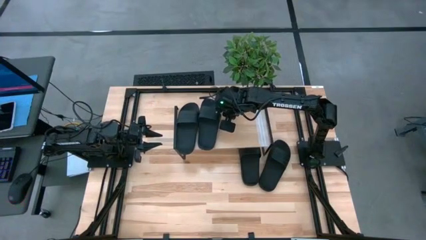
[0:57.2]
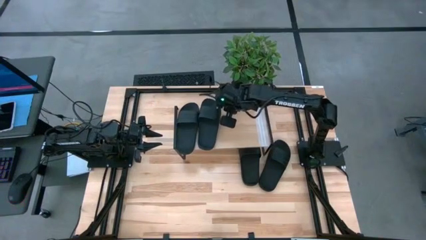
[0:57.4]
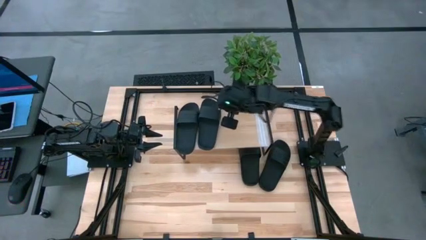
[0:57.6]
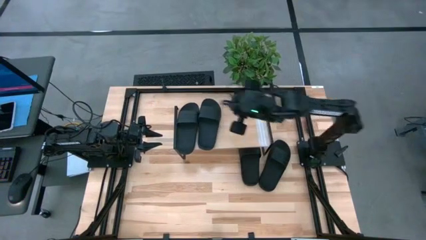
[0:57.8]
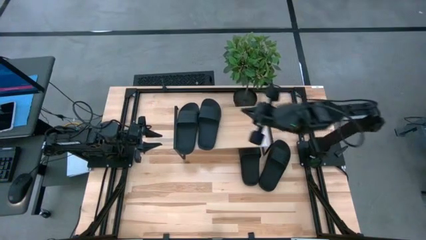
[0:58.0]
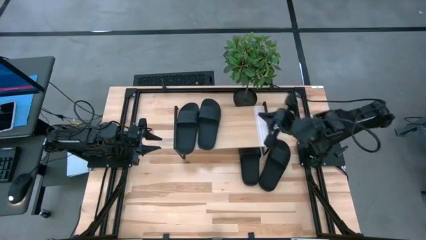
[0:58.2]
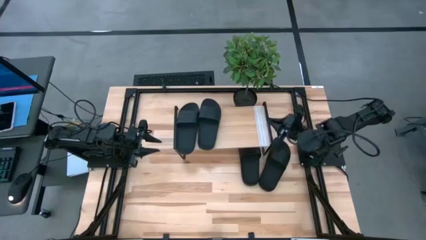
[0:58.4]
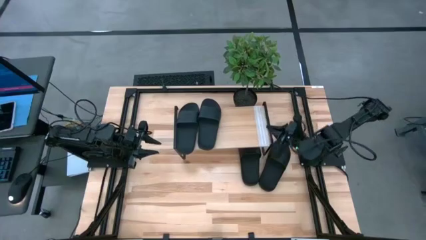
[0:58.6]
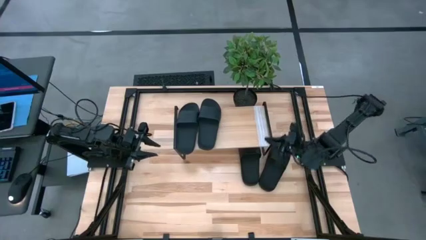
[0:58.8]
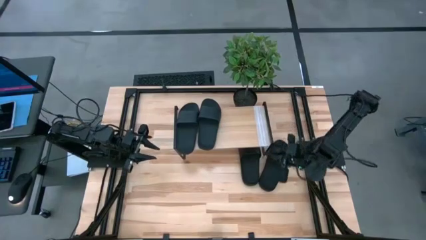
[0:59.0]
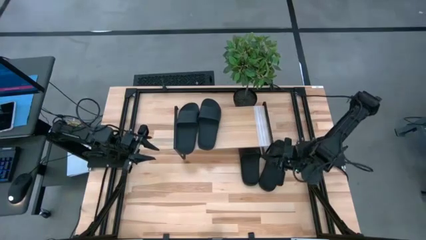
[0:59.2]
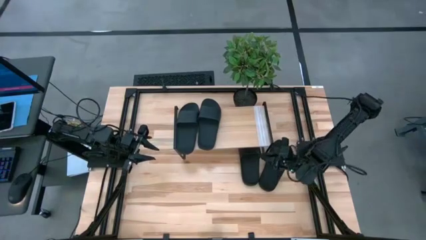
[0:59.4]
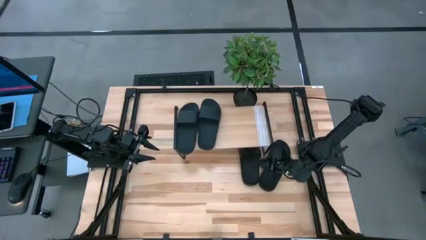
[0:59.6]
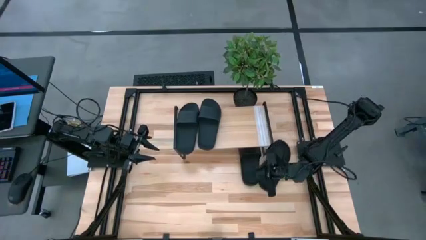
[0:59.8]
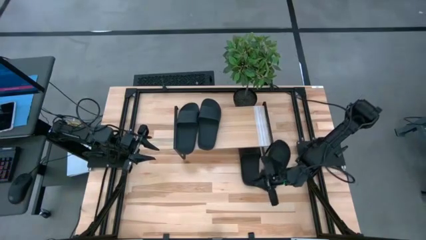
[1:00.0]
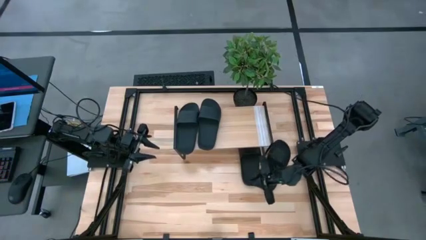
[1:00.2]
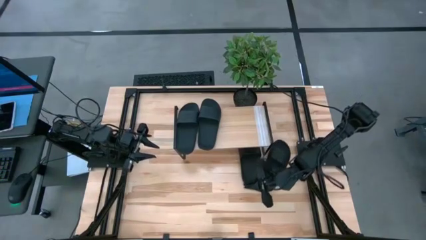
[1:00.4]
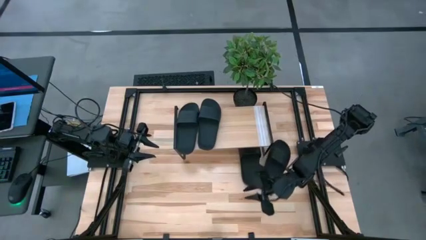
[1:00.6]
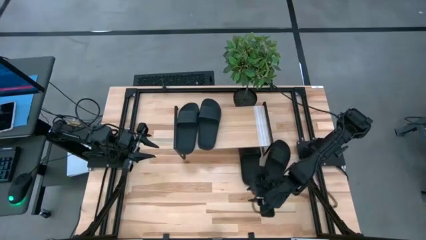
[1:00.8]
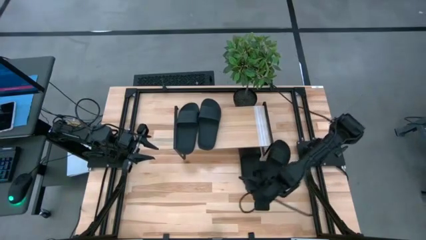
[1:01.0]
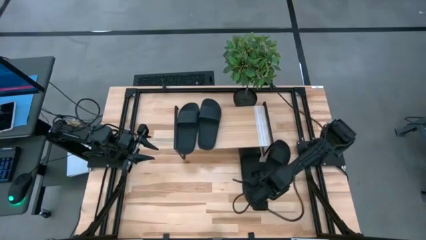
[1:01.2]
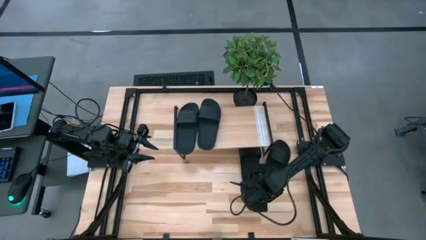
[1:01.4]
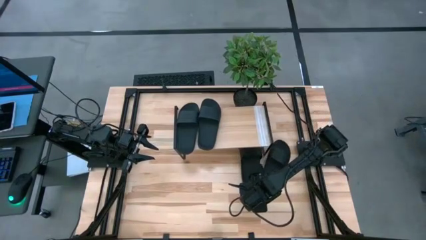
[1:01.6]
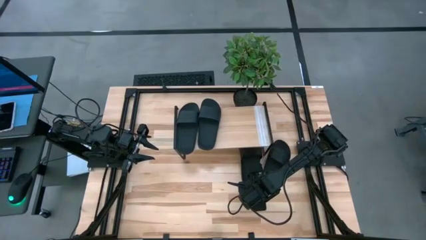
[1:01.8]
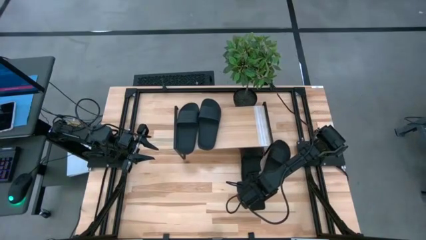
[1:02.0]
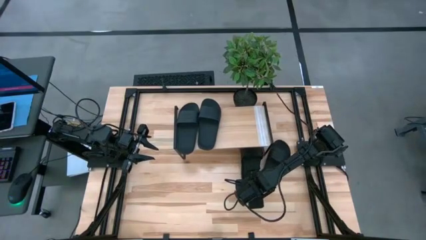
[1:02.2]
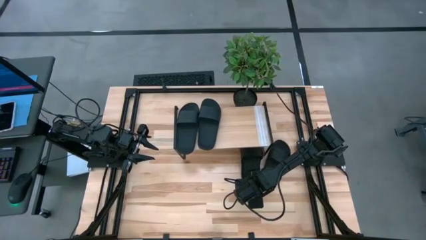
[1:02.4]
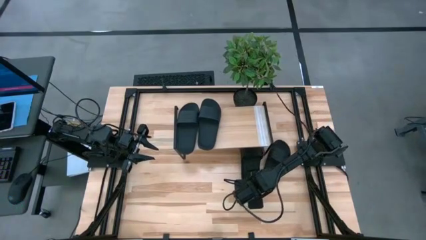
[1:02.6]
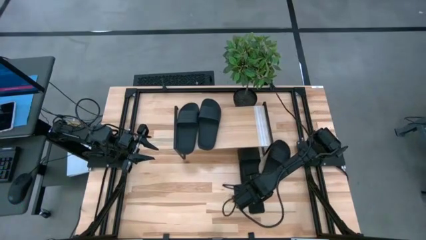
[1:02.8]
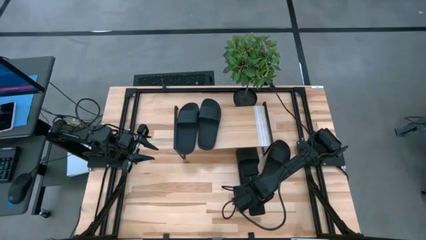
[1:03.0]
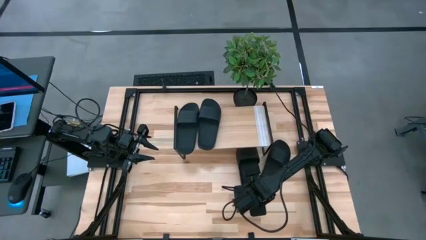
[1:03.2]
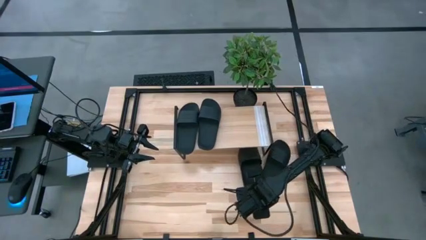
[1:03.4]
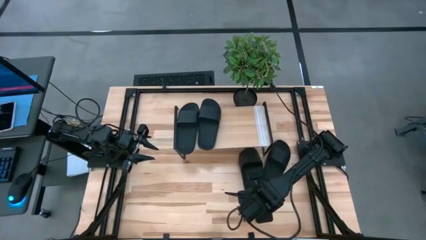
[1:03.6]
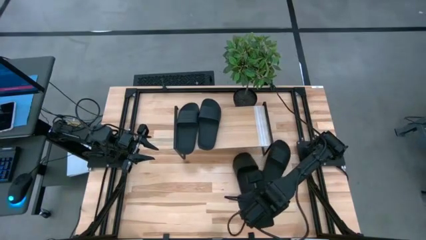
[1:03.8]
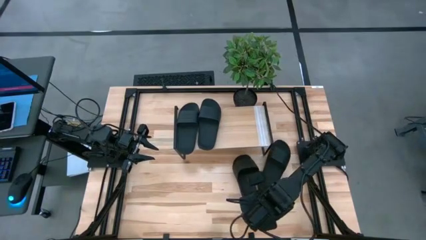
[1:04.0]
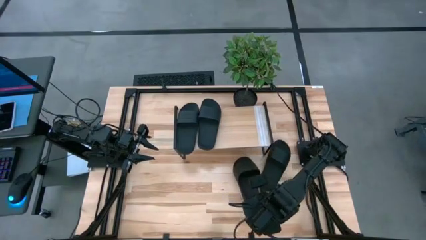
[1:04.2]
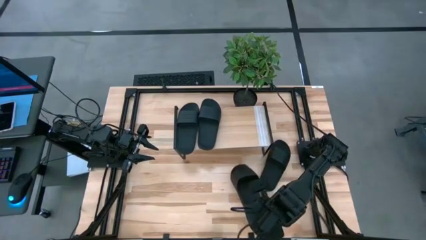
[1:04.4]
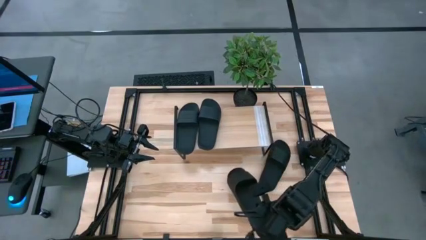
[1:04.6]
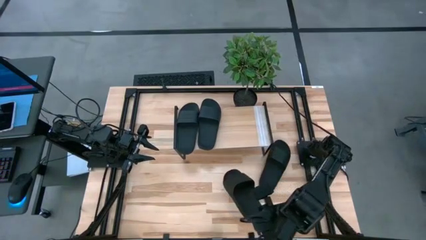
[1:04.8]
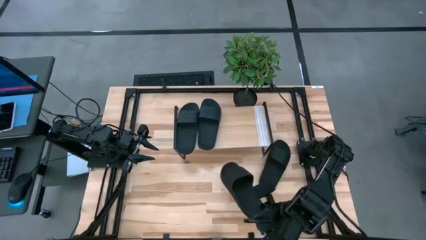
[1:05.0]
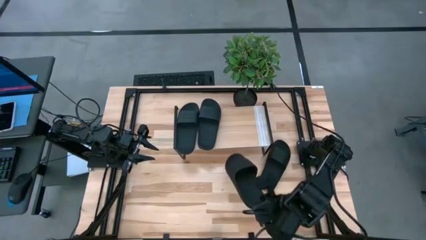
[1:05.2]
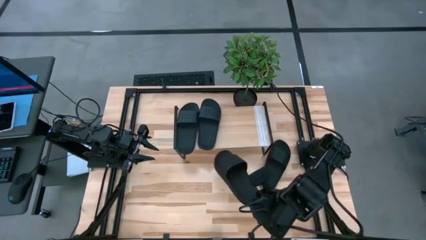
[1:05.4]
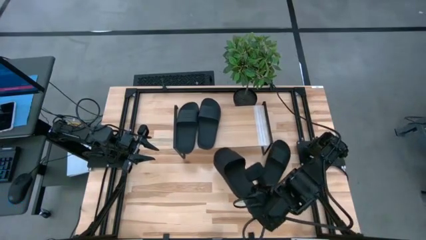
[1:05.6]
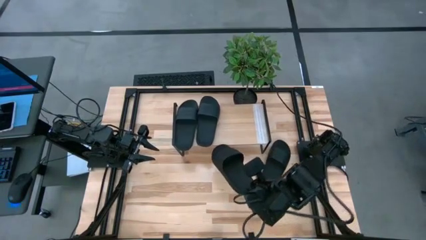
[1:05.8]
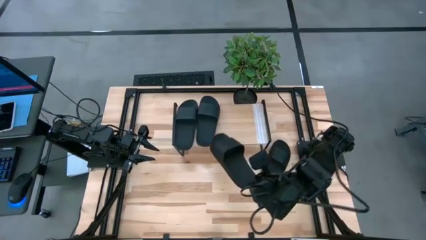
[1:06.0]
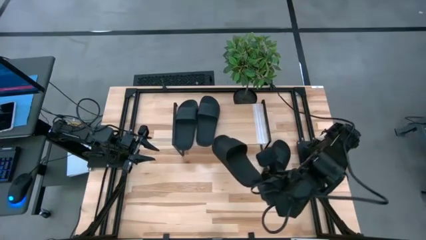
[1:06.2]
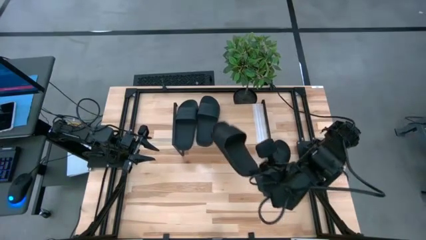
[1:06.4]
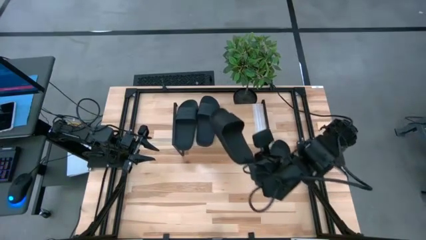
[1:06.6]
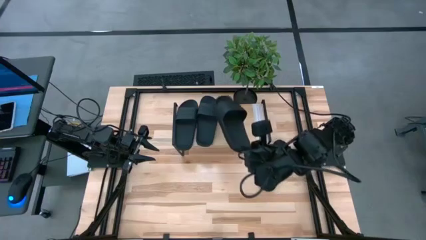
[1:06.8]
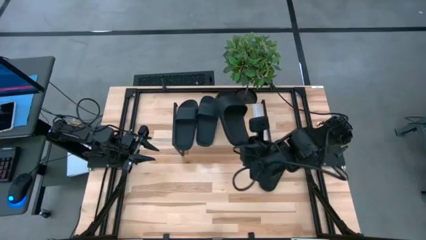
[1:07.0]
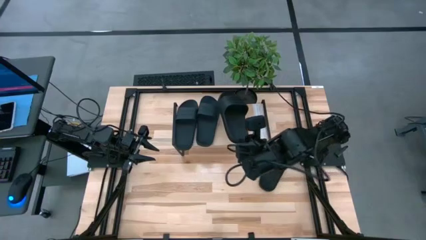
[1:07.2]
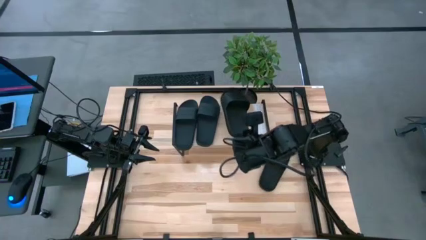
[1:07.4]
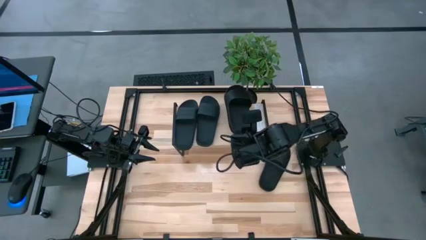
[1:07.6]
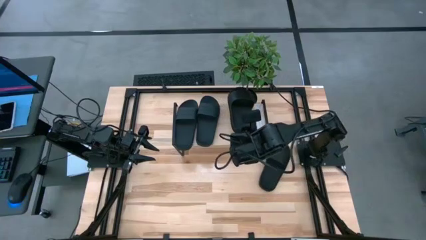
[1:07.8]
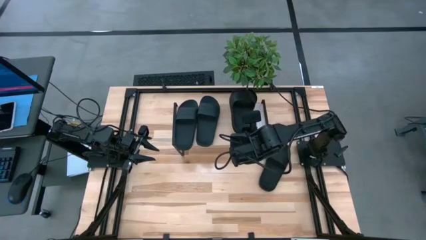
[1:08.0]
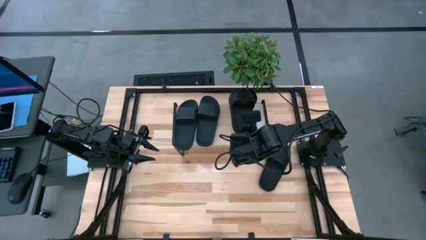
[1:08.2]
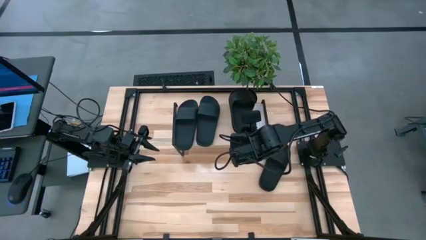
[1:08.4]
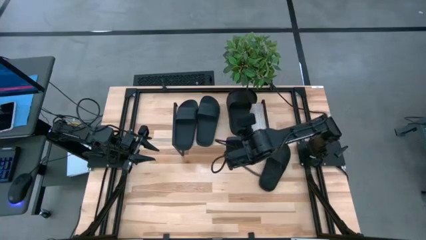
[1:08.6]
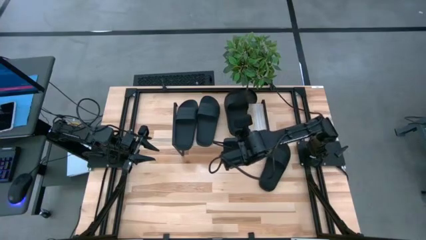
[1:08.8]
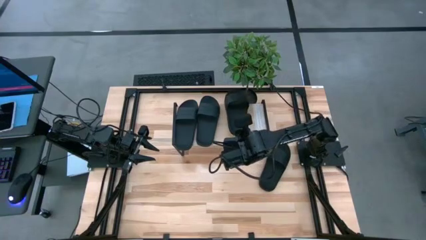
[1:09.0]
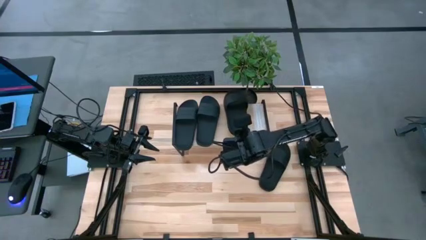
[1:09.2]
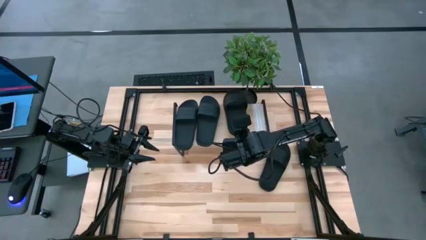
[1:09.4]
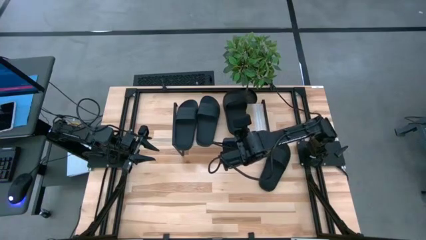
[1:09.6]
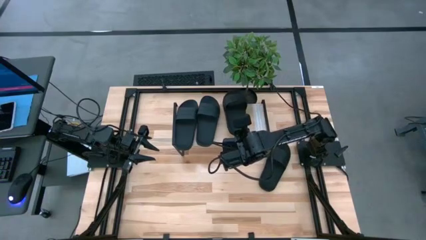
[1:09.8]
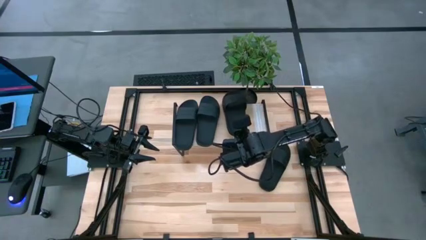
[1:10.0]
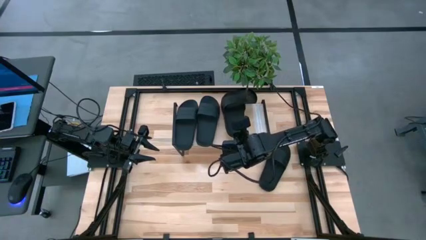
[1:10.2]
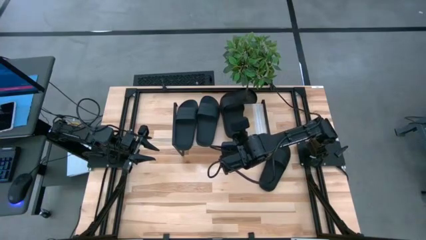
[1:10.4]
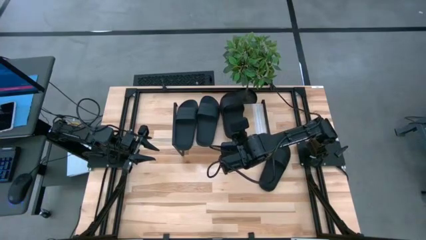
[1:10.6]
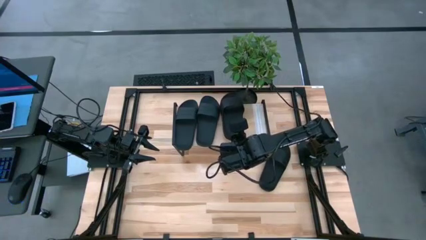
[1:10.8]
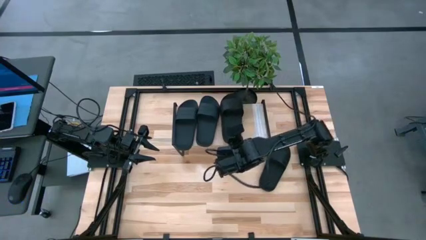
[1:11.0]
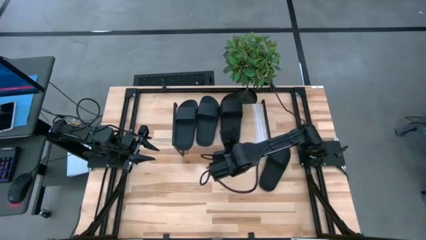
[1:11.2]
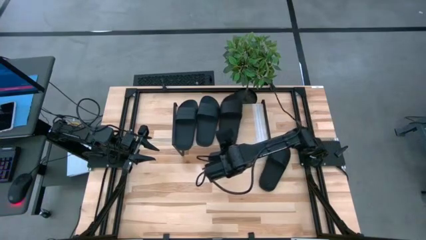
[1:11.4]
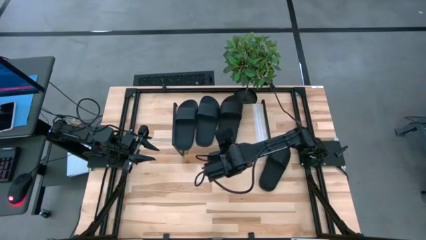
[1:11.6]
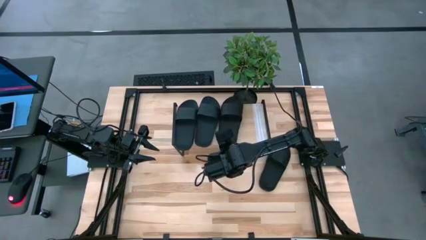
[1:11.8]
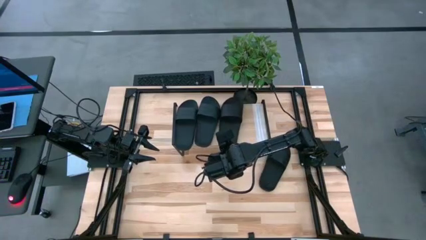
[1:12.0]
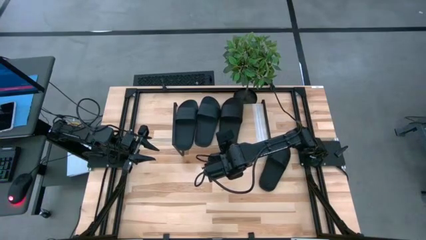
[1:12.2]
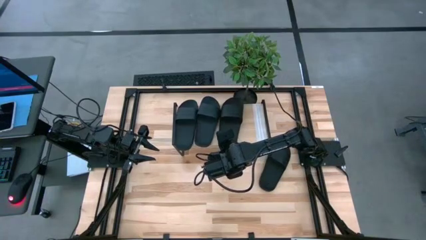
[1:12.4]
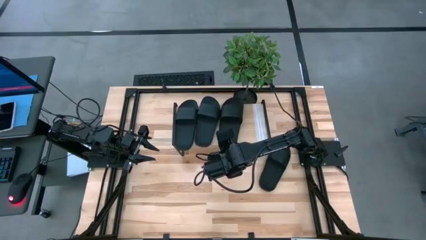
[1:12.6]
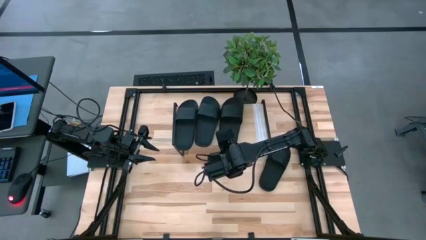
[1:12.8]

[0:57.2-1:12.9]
Task: Pick and place slides into the shelf
Put the black slide on the shelf
